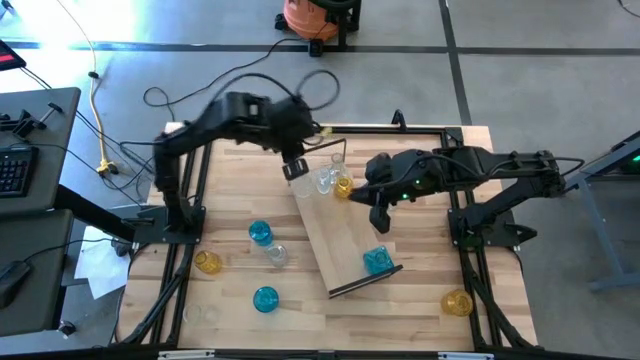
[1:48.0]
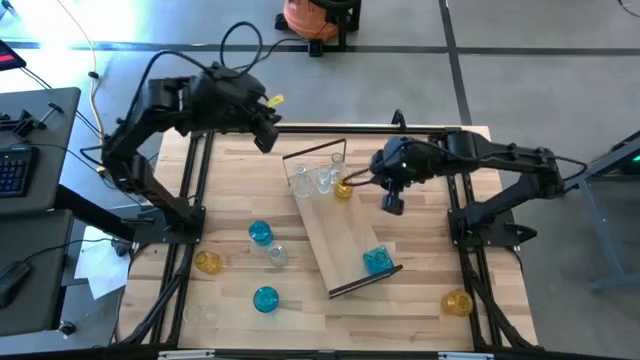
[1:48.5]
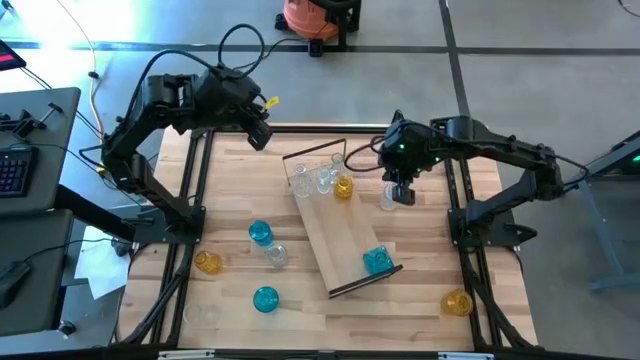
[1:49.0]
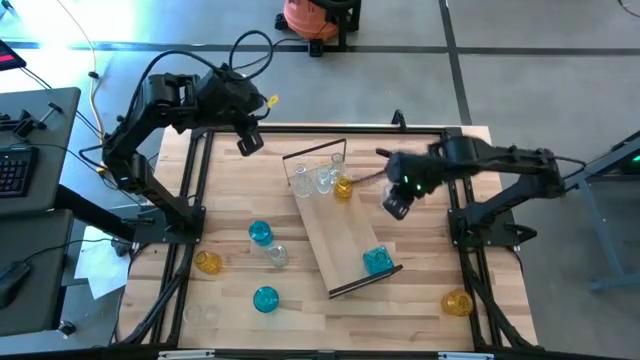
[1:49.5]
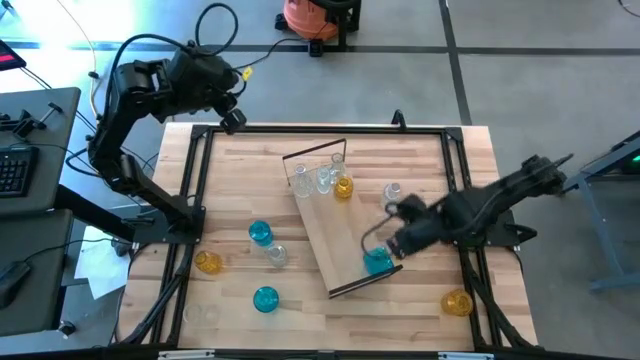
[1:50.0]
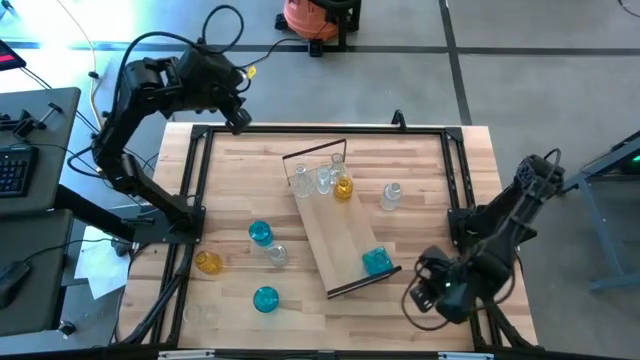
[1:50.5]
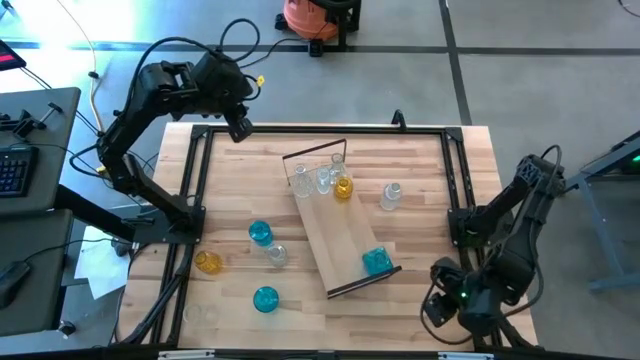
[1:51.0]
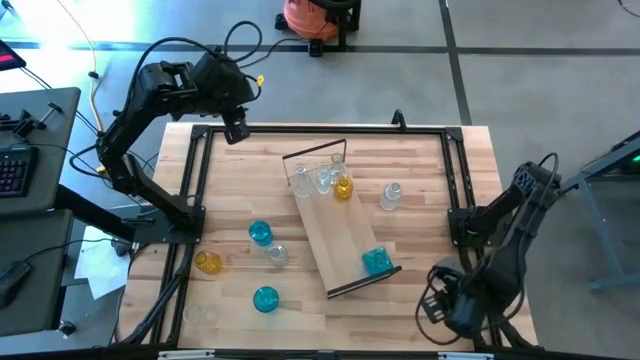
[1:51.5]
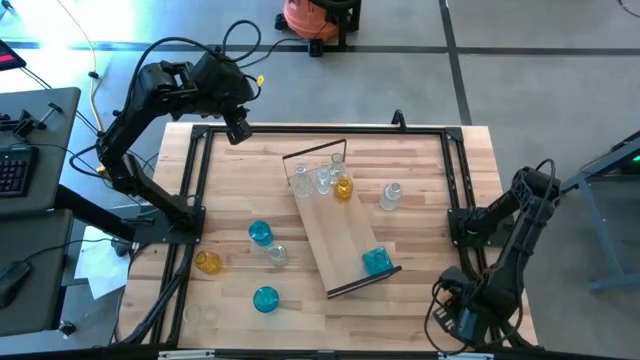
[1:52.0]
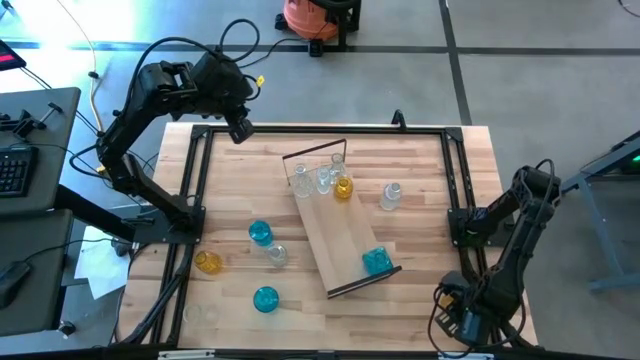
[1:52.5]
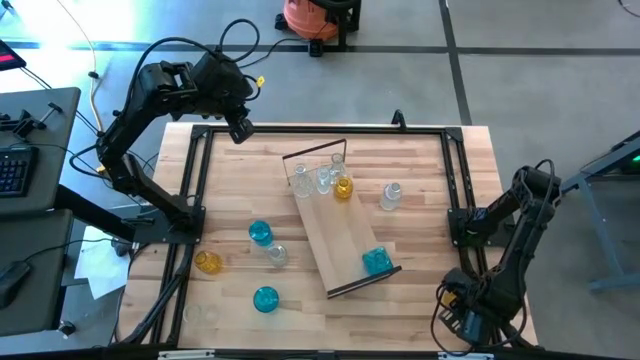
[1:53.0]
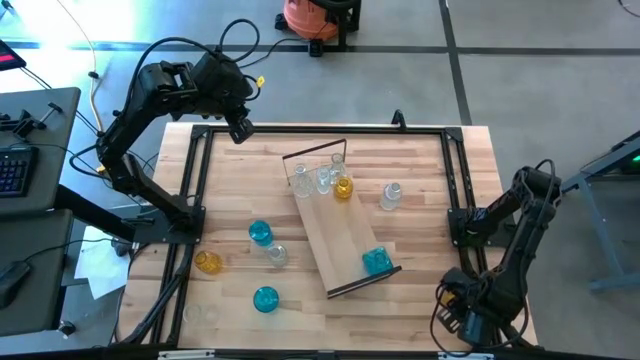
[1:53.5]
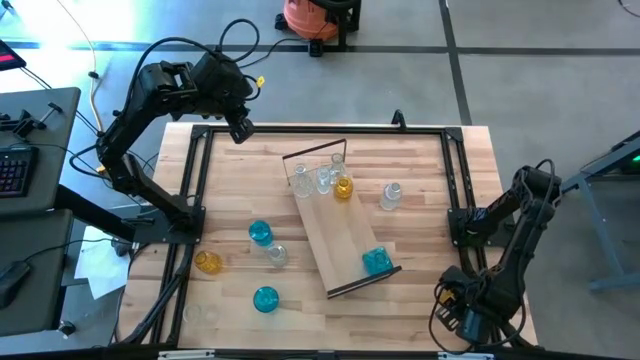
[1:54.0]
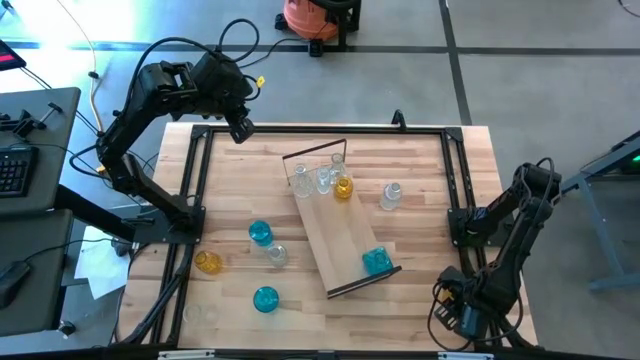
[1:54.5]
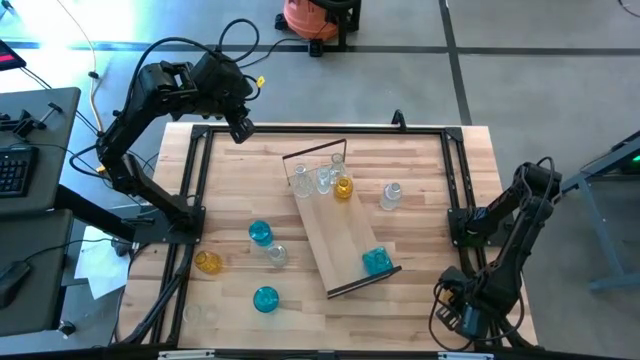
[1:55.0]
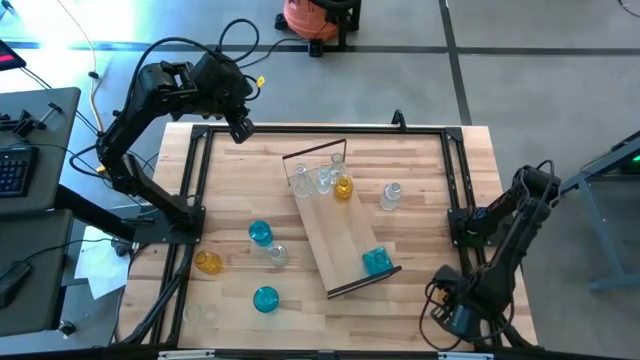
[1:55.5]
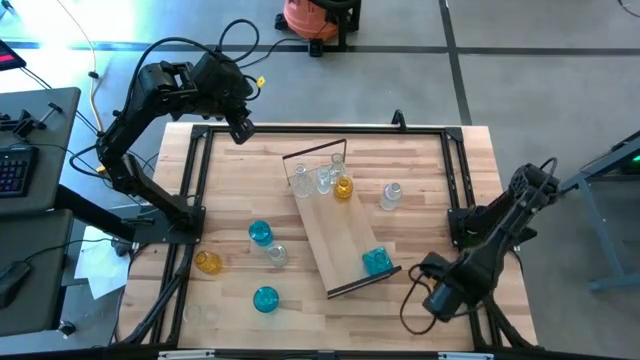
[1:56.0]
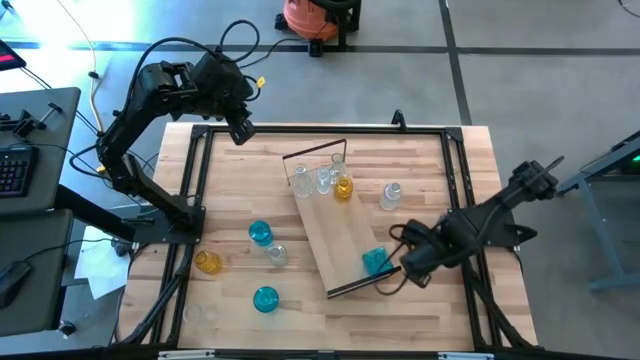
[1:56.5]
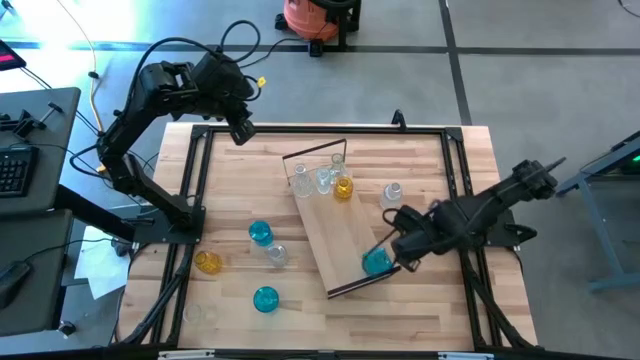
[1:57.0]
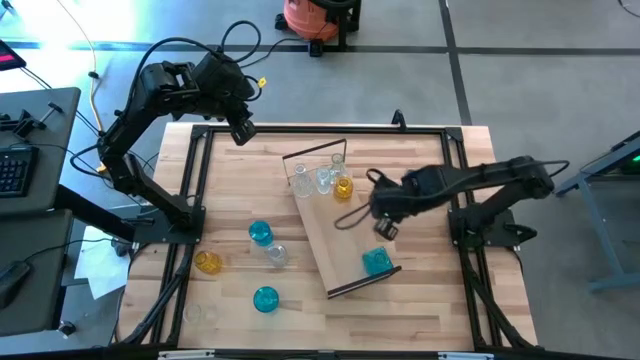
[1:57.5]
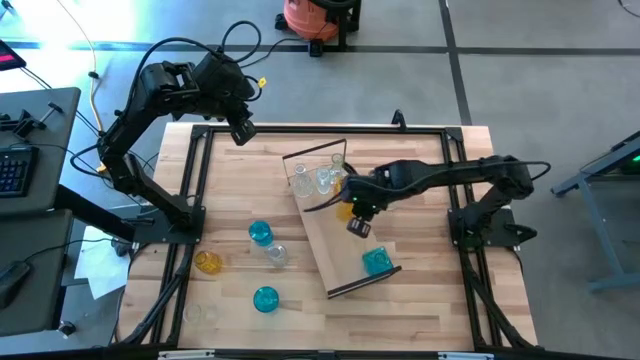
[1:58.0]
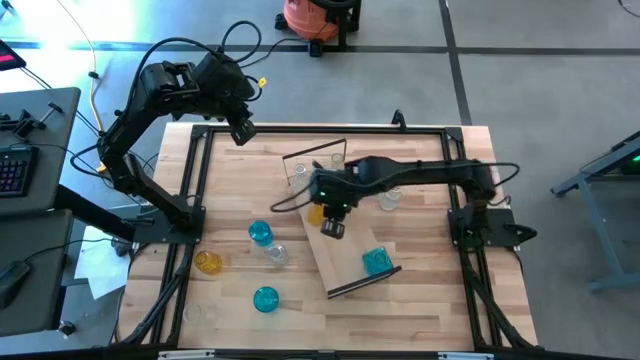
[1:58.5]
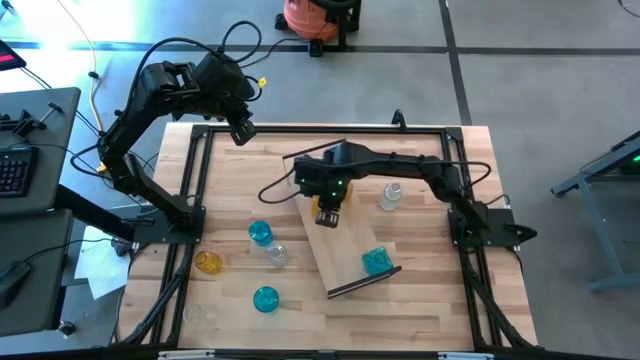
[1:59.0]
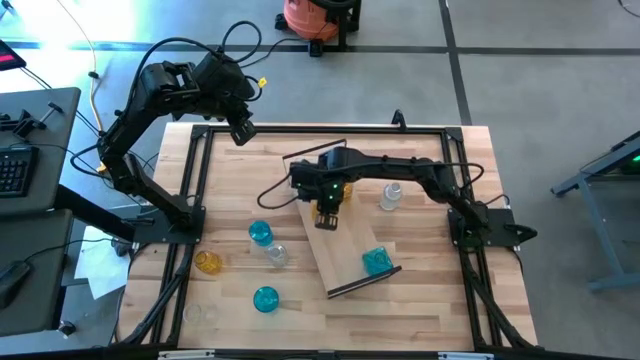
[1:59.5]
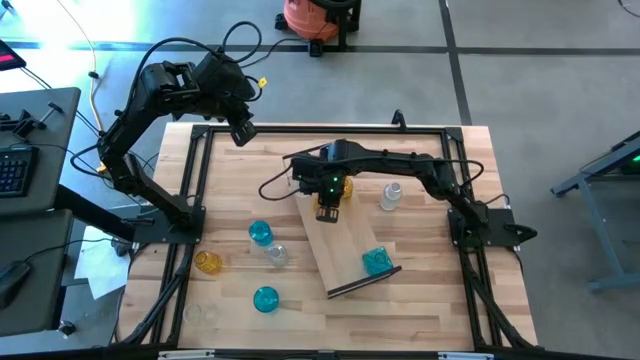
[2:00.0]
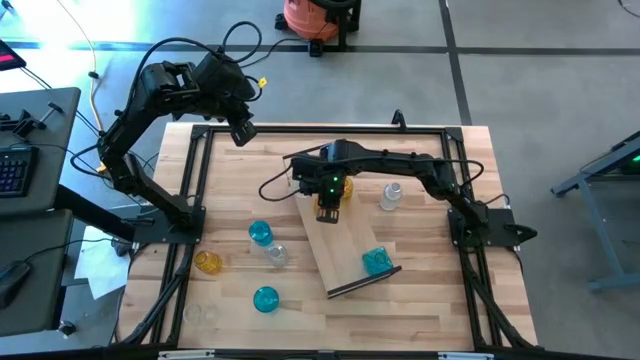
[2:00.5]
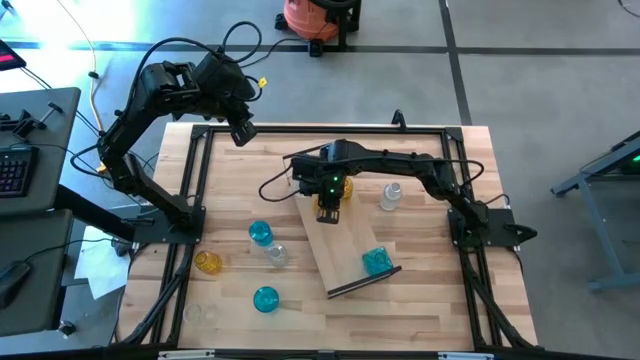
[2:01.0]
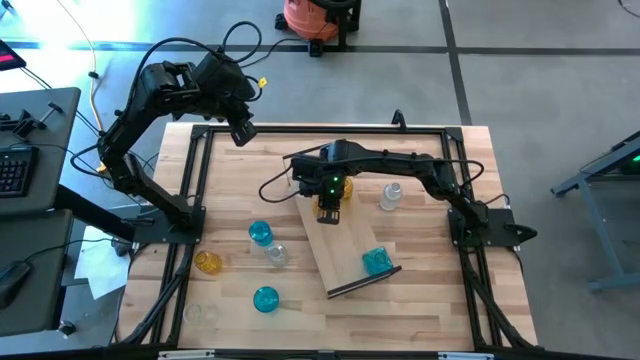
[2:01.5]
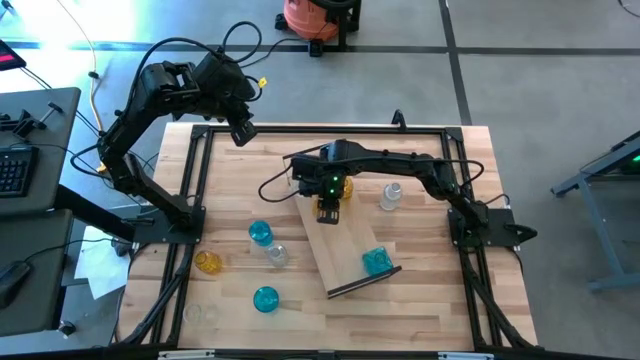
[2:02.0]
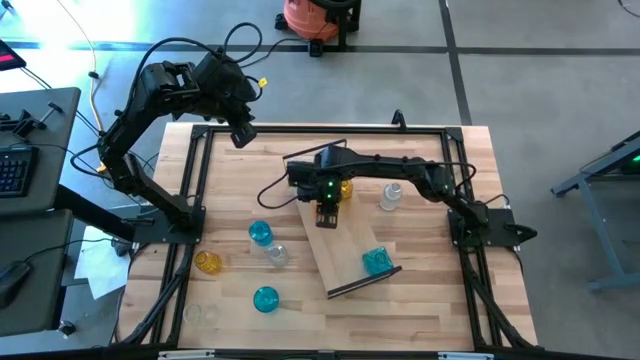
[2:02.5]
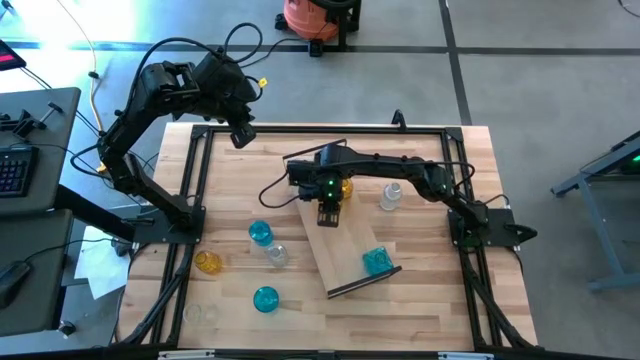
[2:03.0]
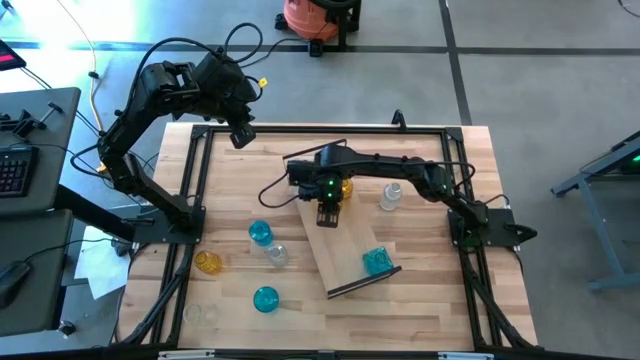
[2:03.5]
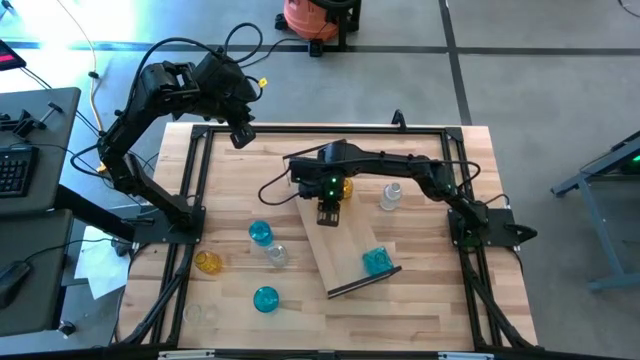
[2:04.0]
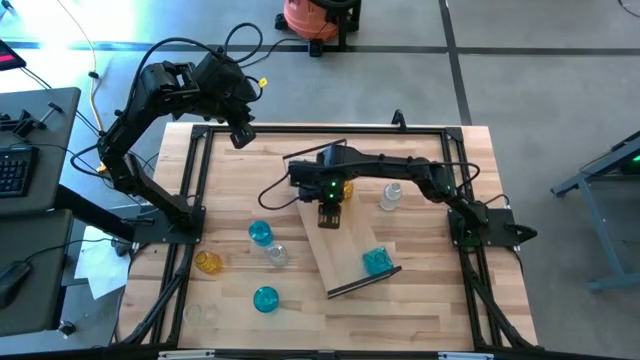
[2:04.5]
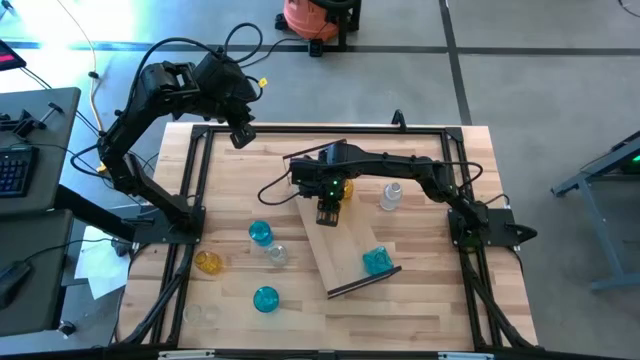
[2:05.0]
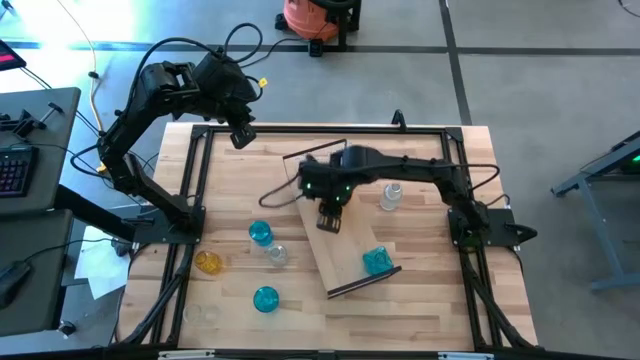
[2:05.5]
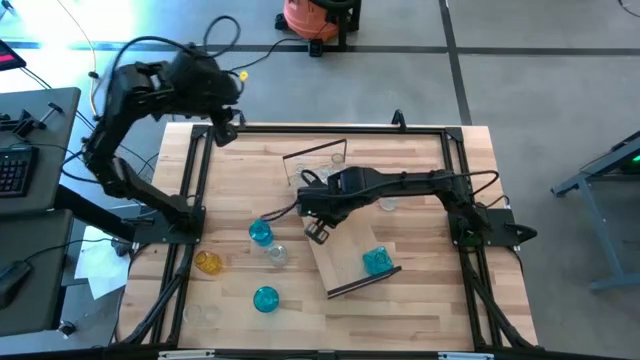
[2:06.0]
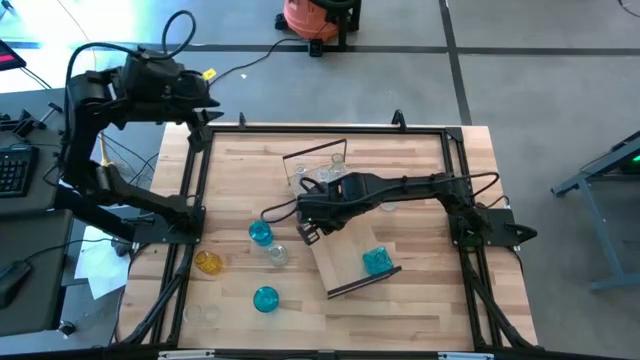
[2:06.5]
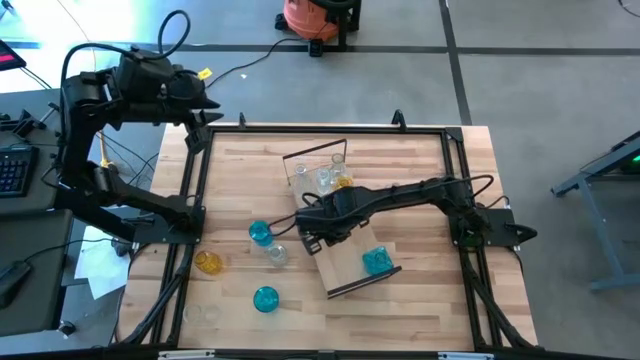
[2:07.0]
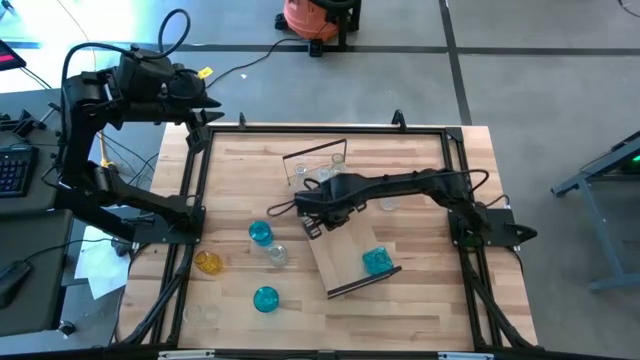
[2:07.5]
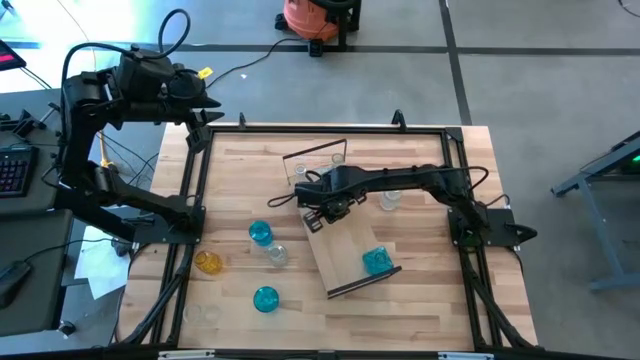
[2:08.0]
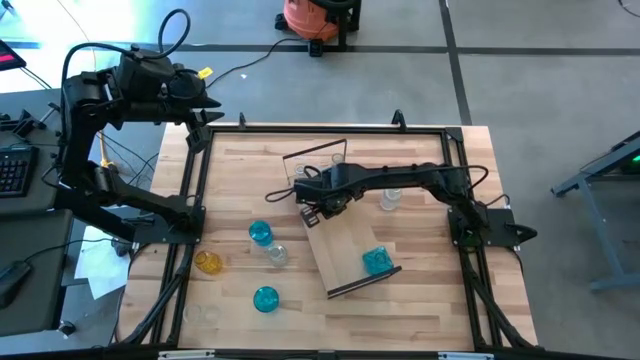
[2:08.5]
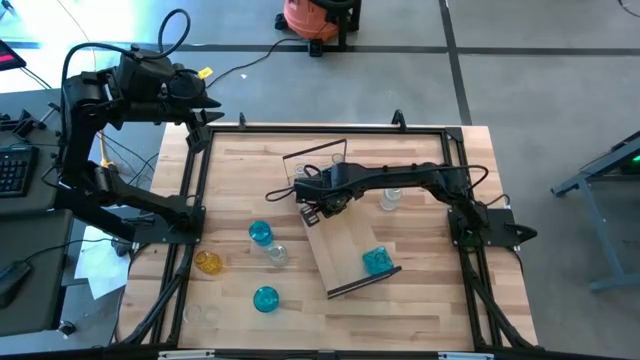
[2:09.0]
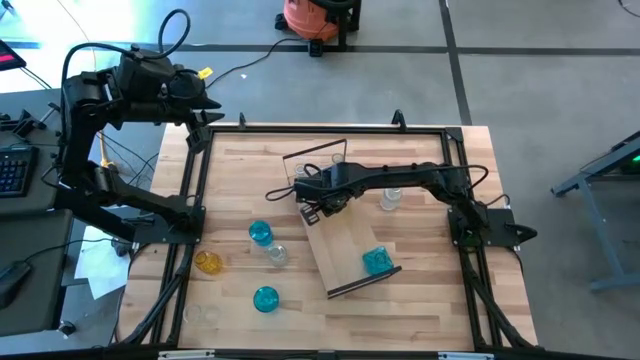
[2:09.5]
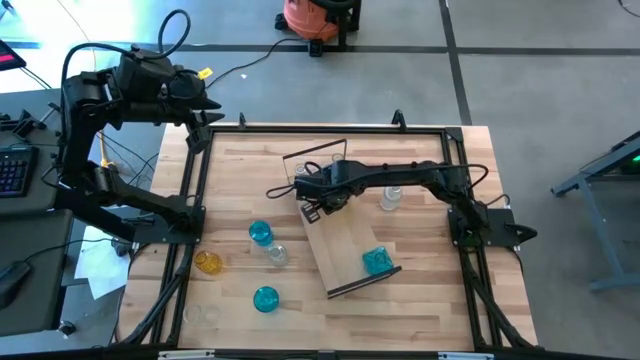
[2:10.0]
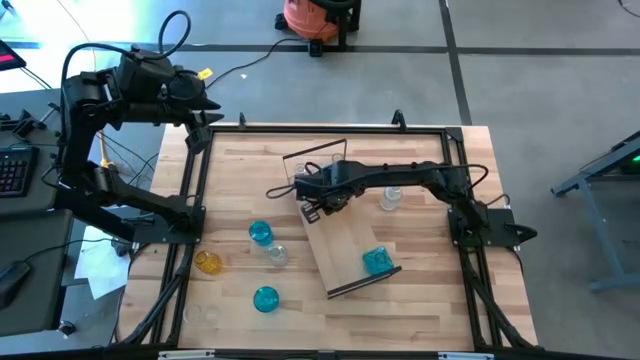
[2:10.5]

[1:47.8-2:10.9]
Task: sort vases onto shelf
Put the yellow crystal vase on the shelf aligned with the other yellow crystal vase
